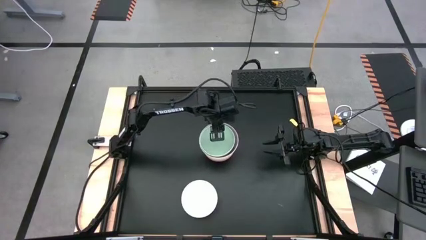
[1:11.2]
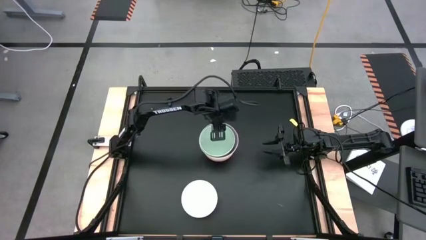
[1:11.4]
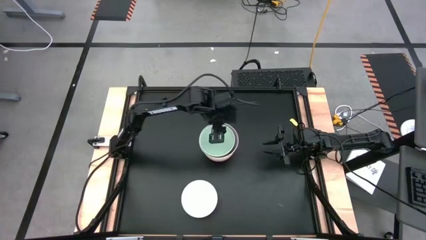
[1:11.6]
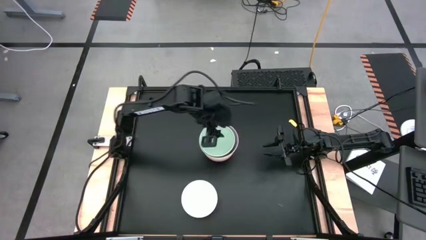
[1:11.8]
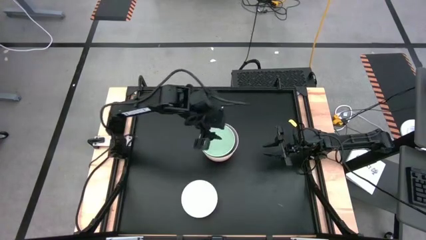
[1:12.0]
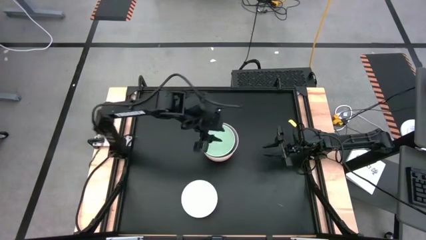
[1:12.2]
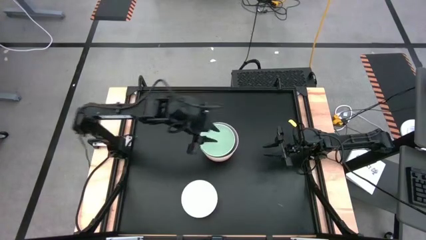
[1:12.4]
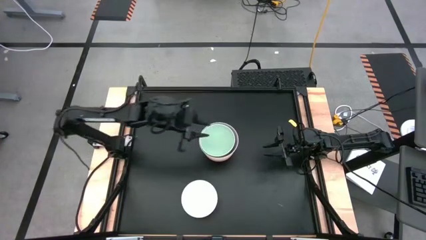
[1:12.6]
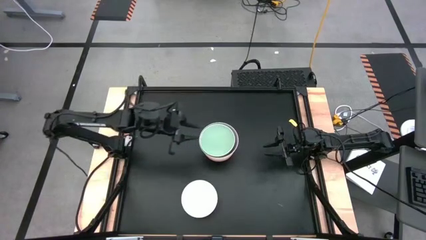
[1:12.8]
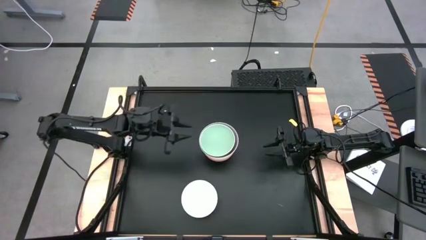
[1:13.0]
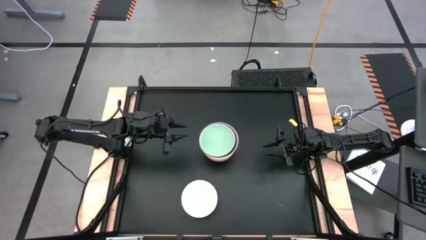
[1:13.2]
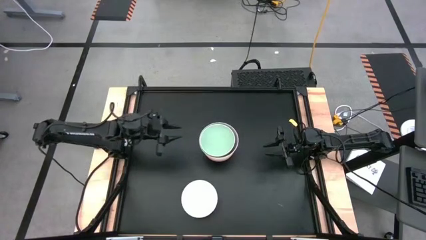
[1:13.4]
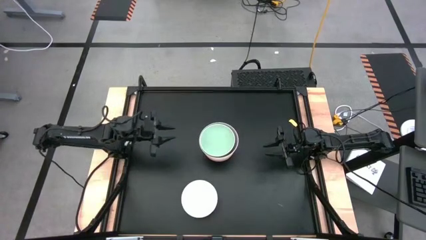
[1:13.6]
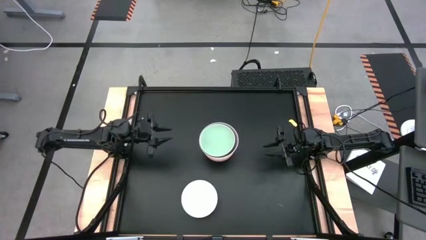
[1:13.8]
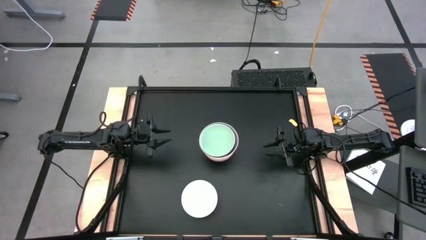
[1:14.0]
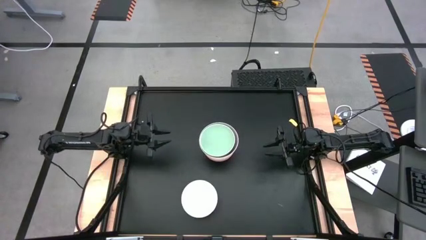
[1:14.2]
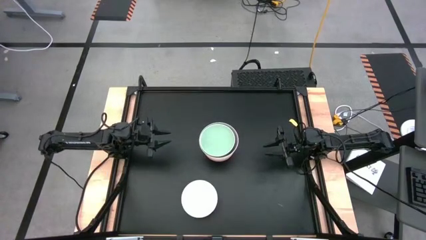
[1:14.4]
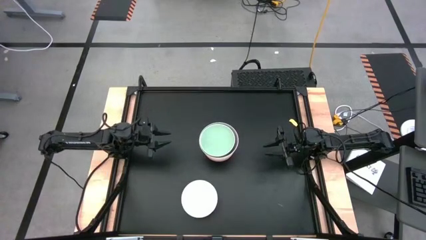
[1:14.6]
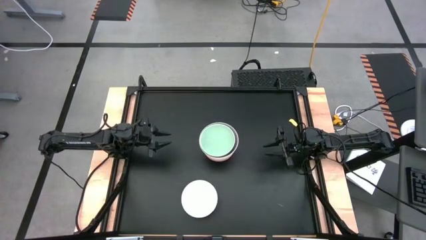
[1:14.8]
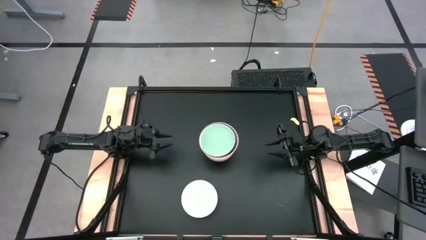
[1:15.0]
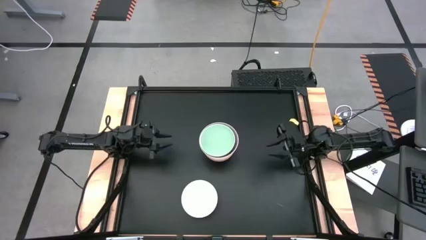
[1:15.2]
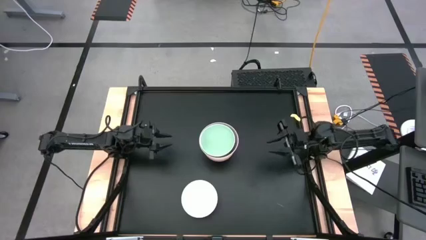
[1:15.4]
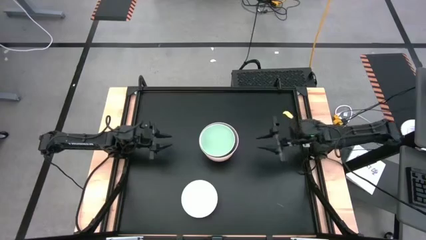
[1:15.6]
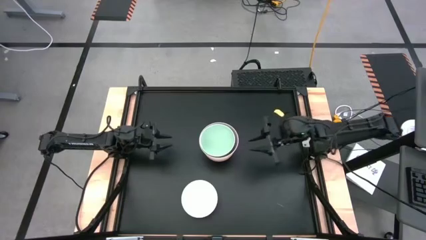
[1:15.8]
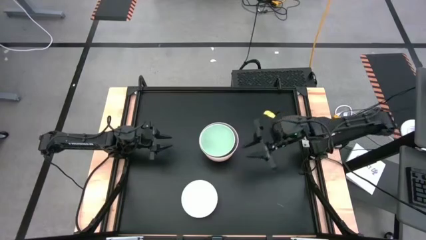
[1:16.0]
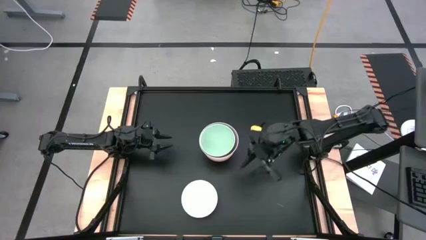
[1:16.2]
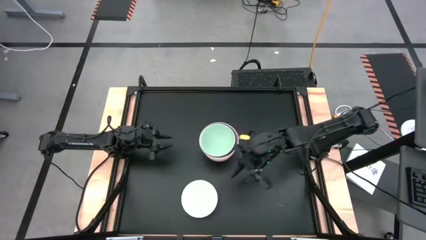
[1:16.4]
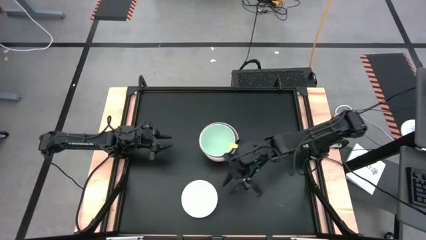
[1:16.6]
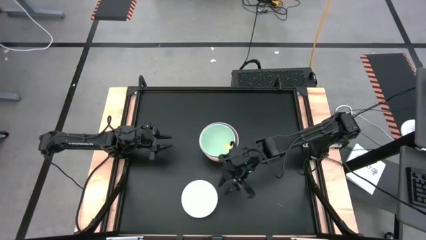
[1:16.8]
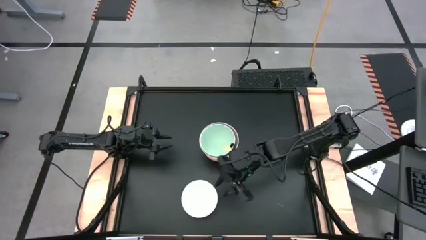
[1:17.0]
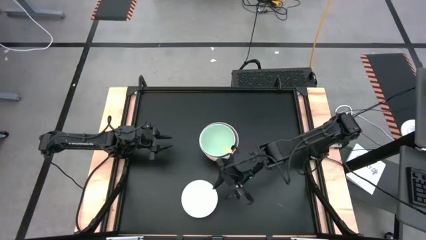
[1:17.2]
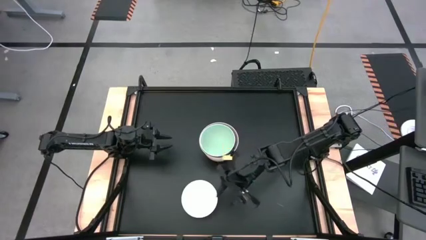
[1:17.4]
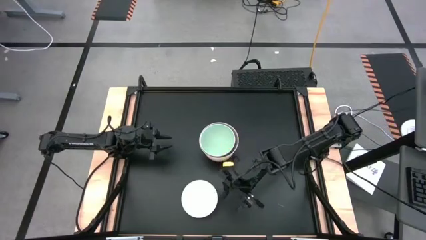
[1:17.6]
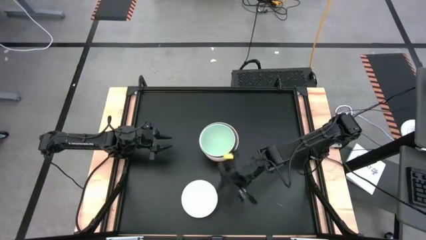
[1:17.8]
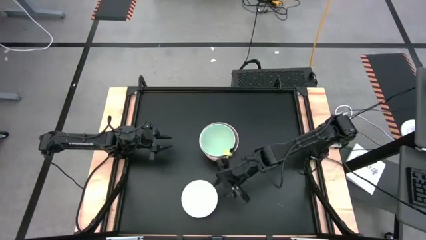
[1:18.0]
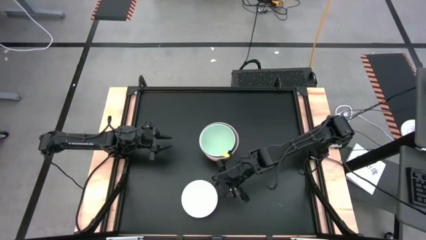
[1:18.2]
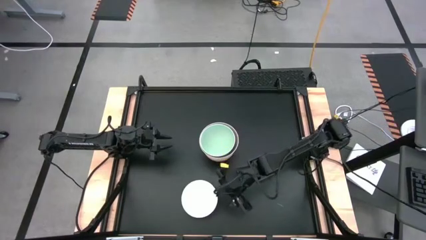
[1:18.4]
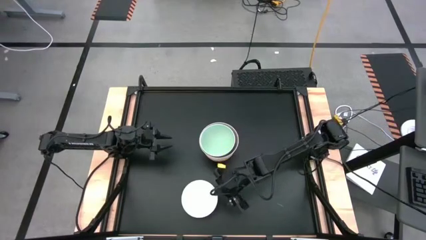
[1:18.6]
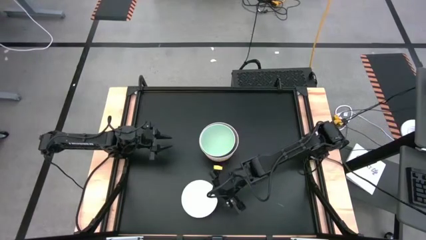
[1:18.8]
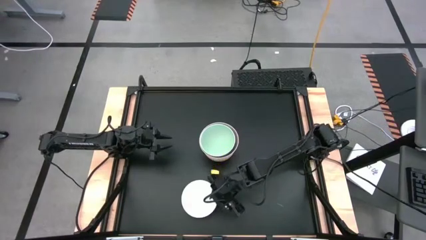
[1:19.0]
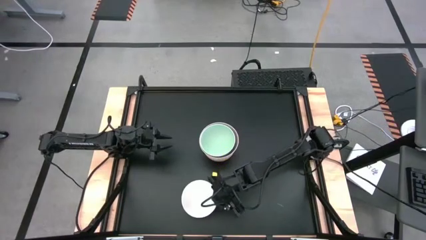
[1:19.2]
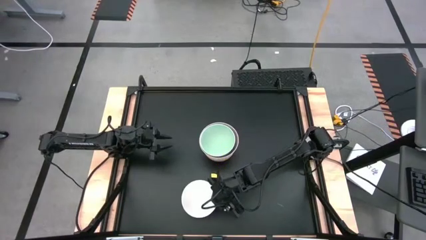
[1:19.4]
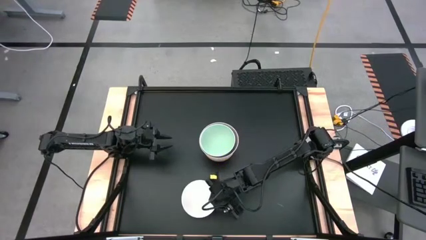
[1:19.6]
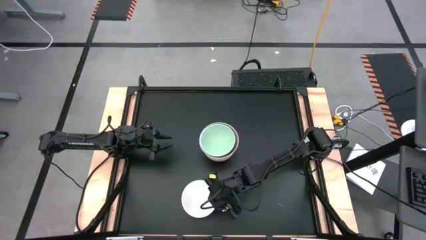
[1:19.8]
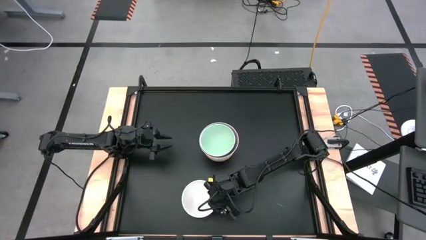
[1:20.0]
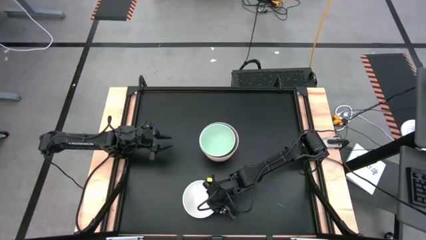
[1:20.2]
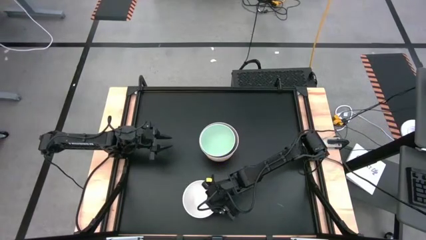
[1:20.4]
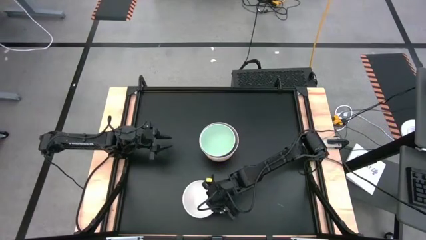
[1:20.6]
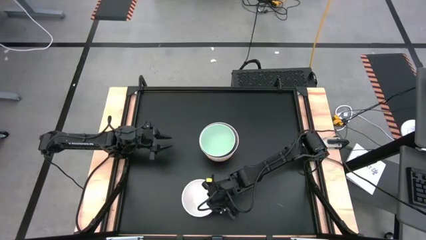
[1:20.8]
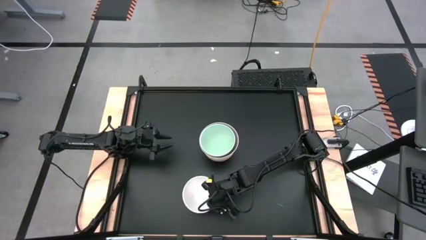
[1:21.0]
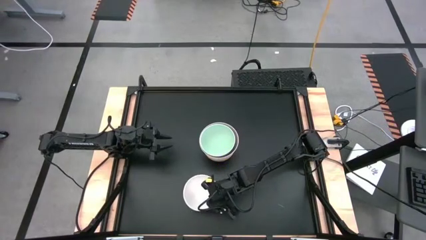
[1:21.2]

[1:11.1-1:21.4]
Task: Nest bowls inside each other
Stack the white bowl on top of the light green bowl

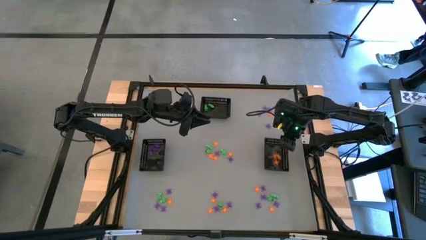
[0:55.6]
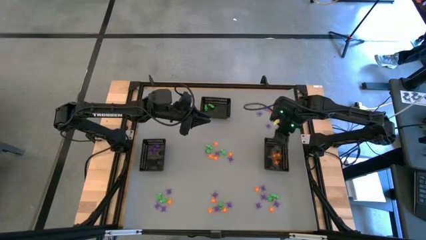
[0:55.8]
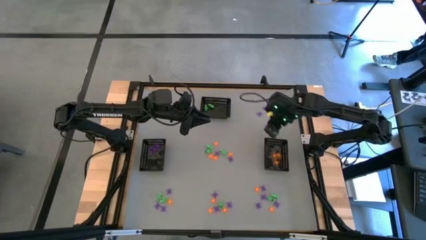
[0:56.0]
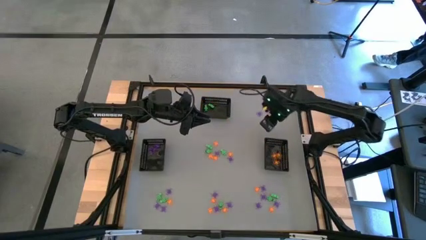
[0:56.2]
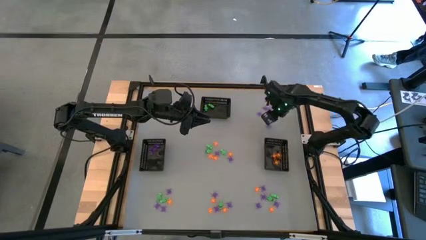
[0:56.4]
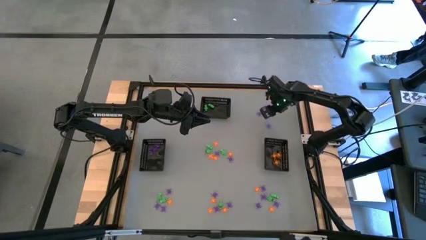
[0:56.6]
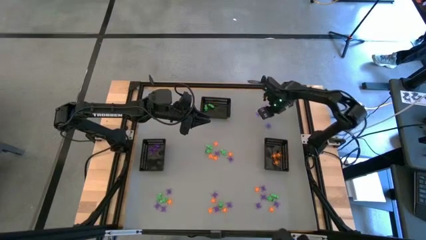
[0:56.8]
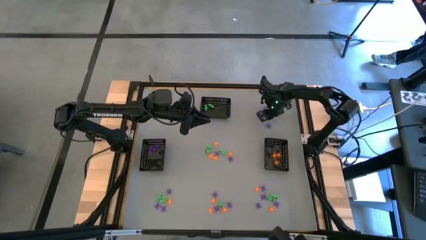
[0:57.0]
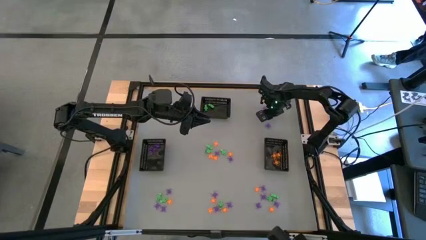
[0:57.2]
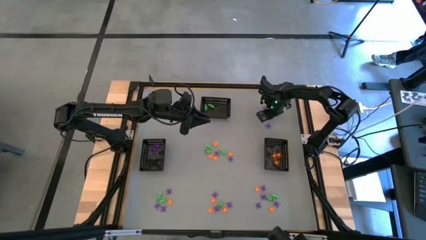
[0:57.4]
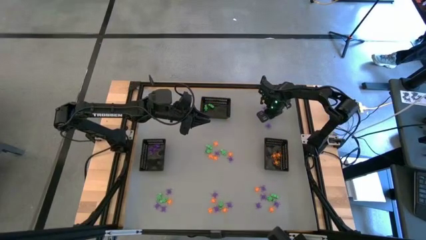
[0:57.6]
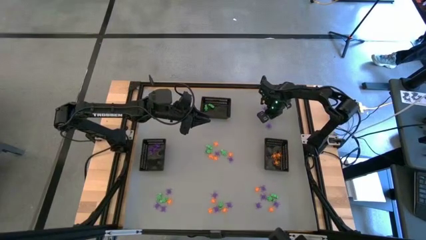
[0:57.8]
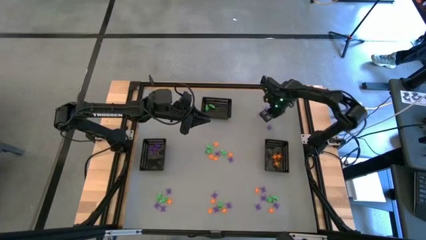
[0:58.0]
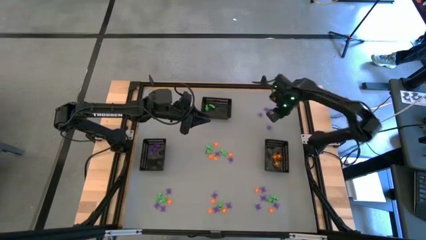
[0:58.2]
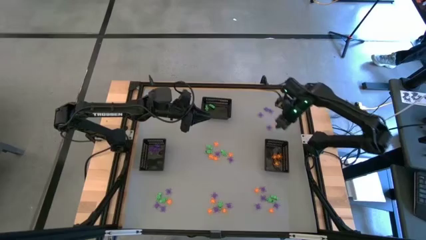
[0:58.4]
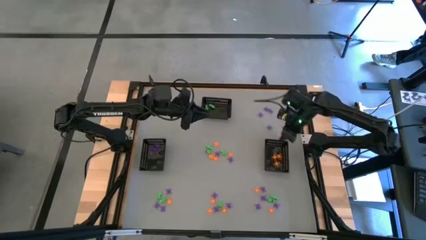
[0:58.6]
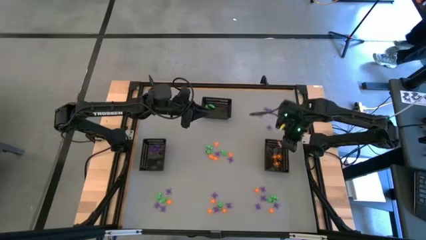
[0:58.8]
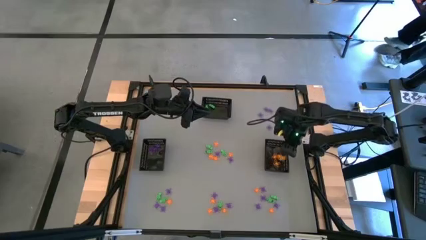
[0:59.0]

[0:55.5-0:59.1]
Task: Sort Halloween decoration
Put the orange spider toy into the right bin
